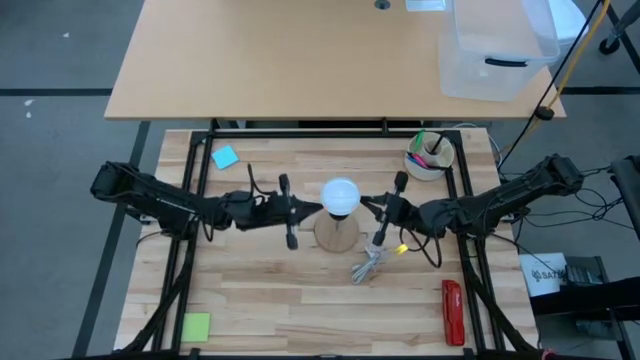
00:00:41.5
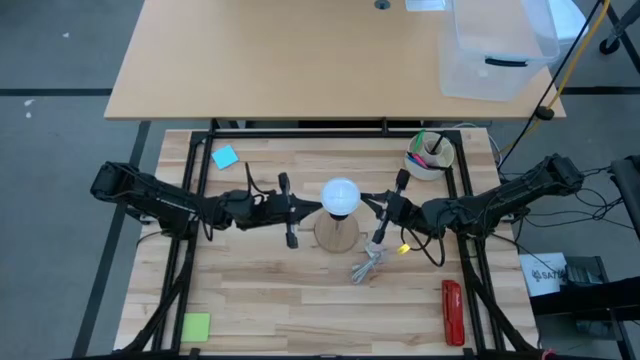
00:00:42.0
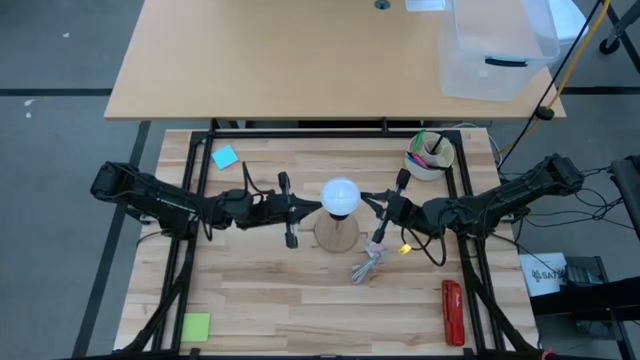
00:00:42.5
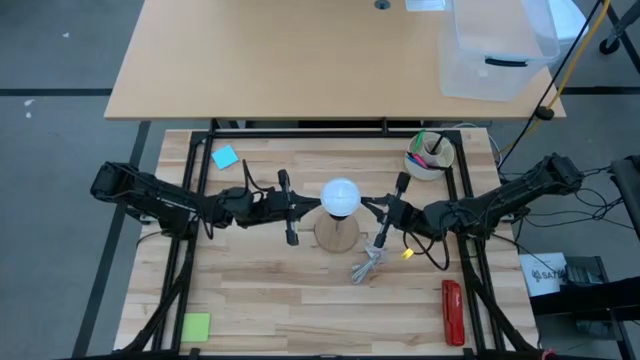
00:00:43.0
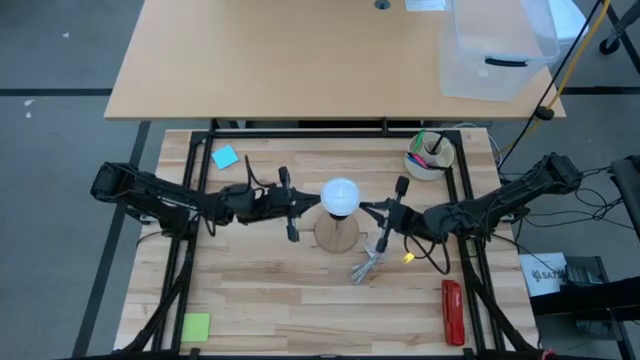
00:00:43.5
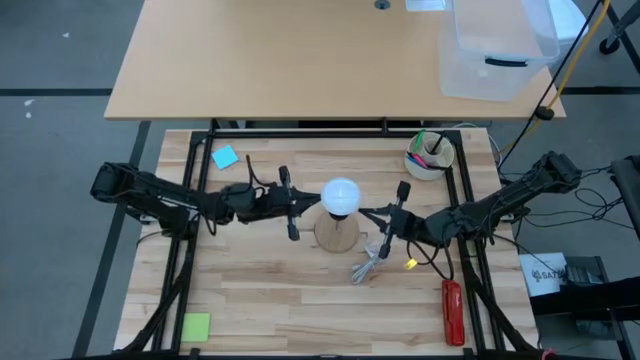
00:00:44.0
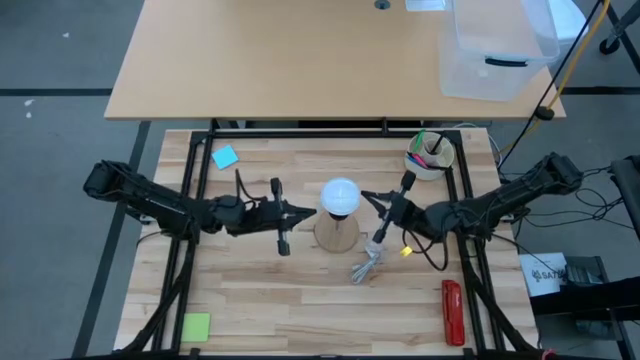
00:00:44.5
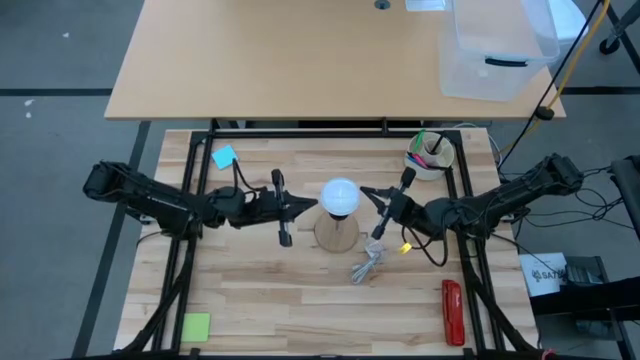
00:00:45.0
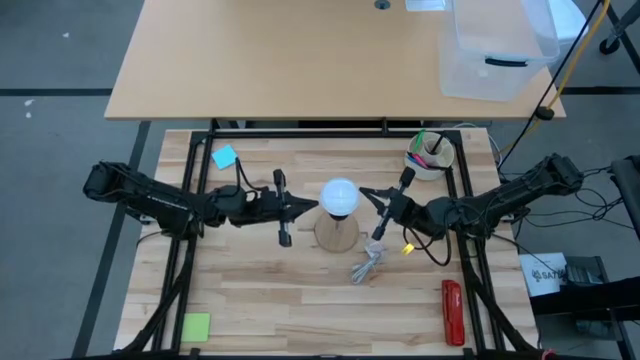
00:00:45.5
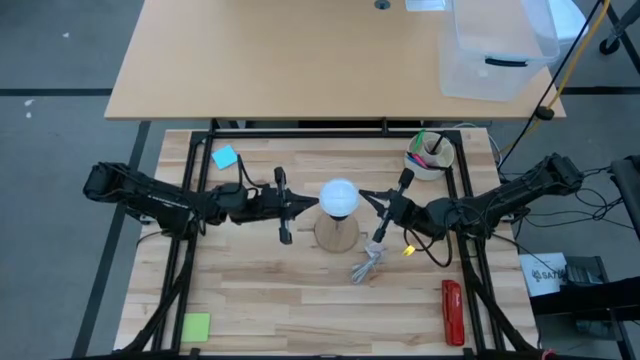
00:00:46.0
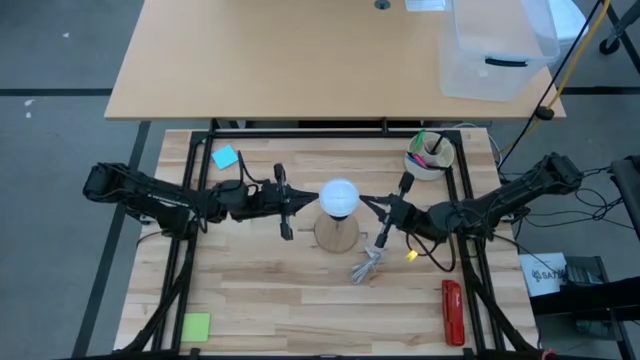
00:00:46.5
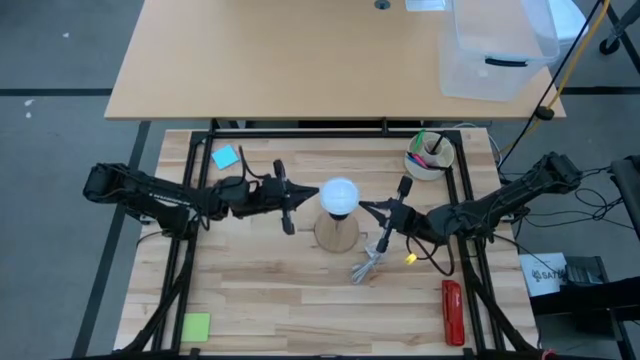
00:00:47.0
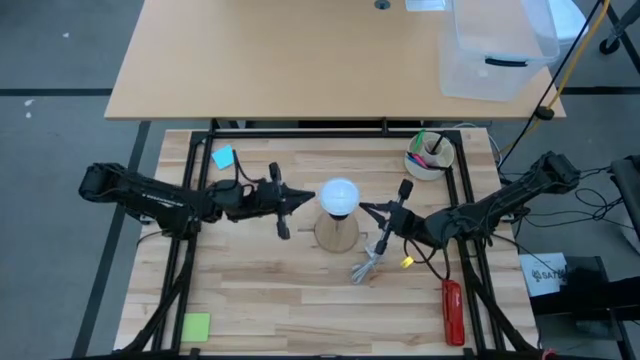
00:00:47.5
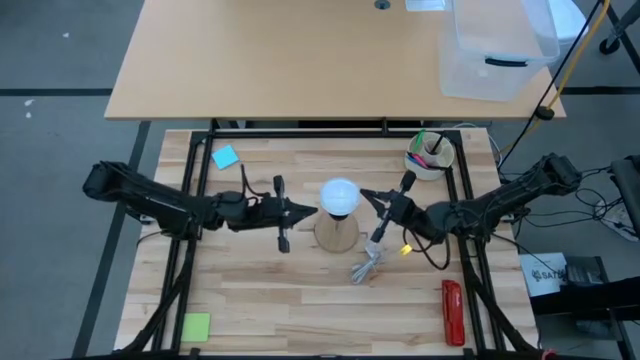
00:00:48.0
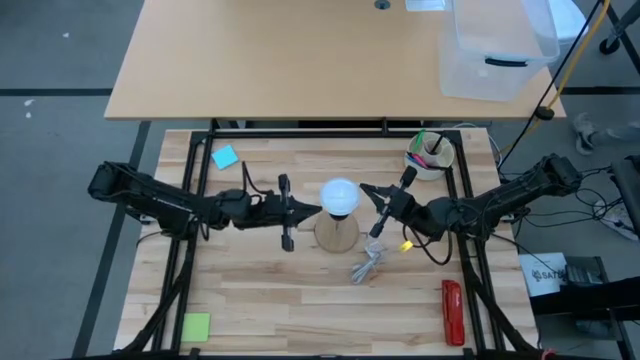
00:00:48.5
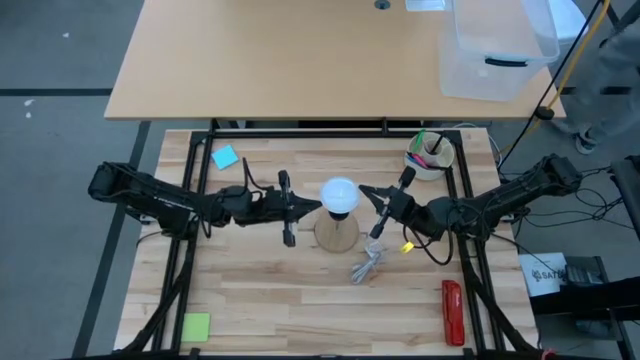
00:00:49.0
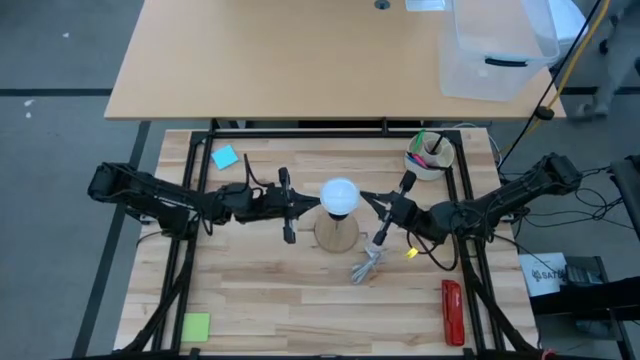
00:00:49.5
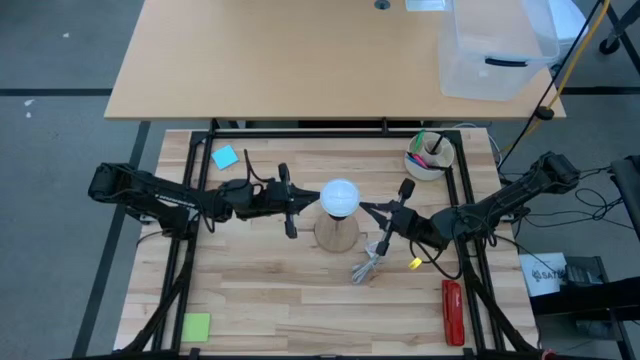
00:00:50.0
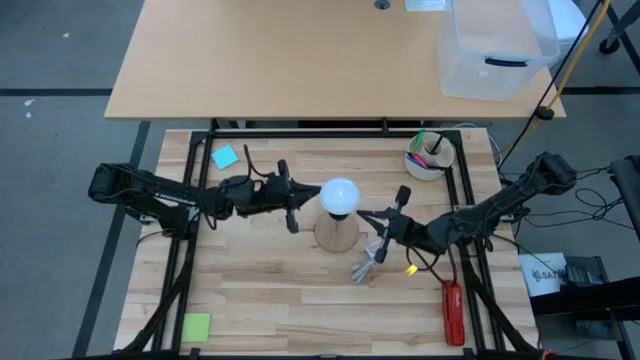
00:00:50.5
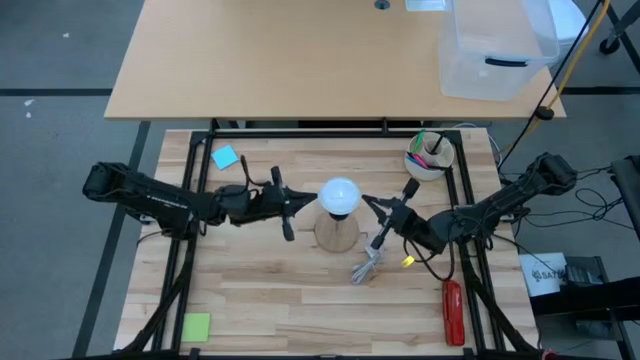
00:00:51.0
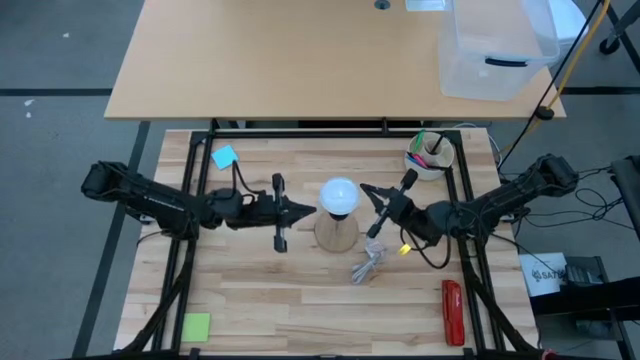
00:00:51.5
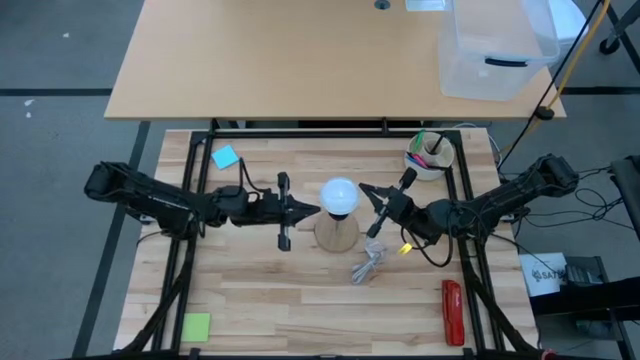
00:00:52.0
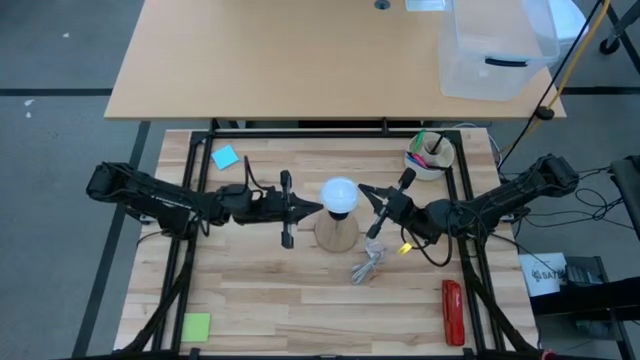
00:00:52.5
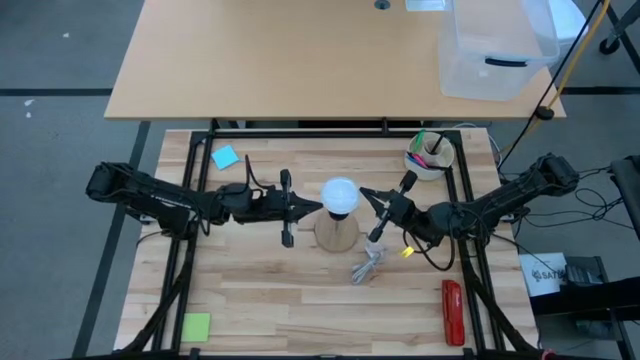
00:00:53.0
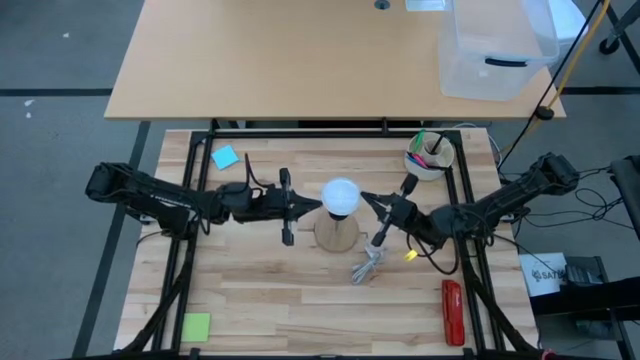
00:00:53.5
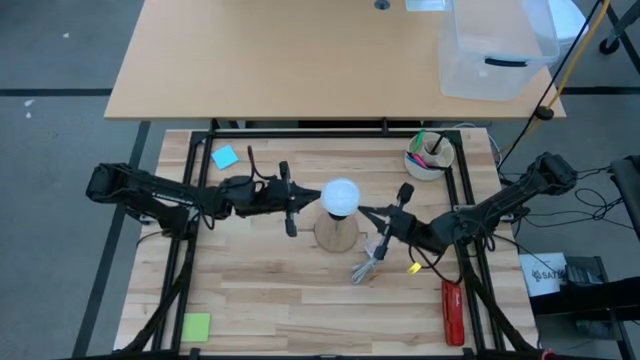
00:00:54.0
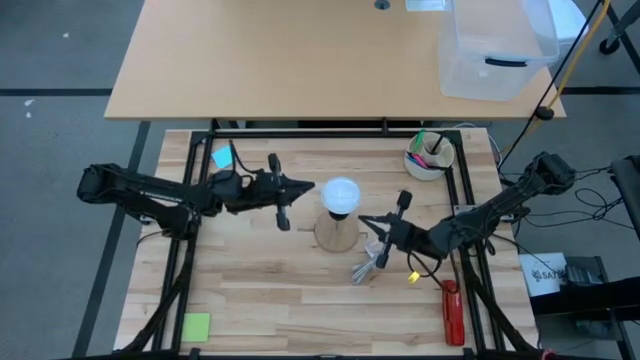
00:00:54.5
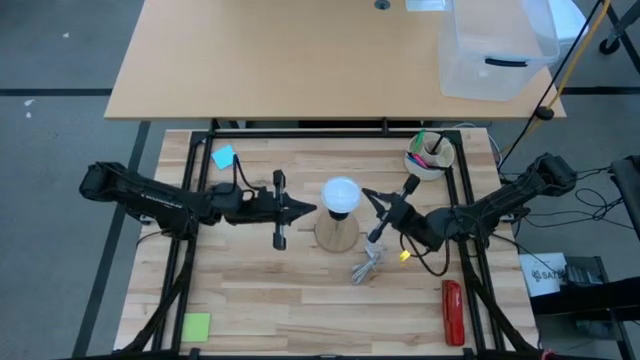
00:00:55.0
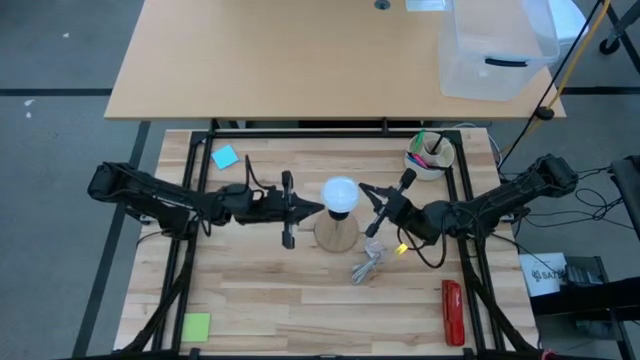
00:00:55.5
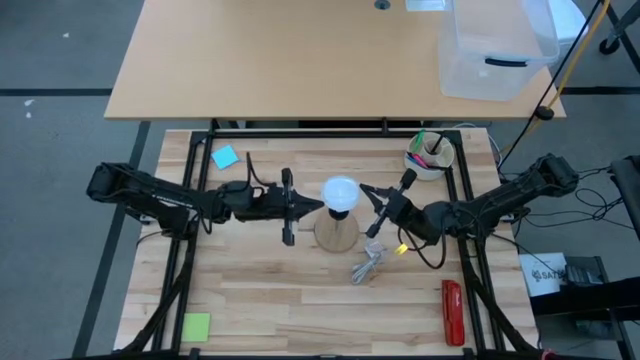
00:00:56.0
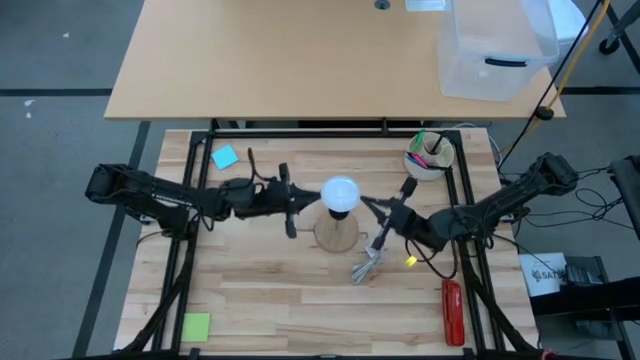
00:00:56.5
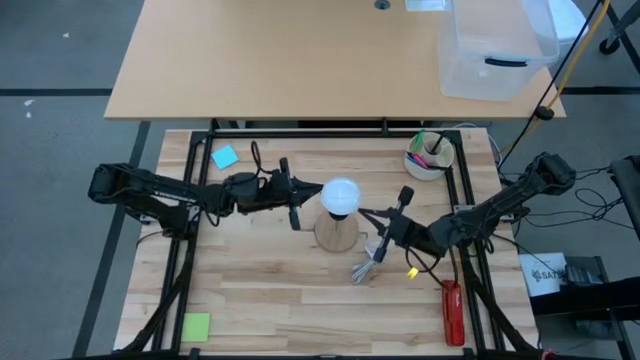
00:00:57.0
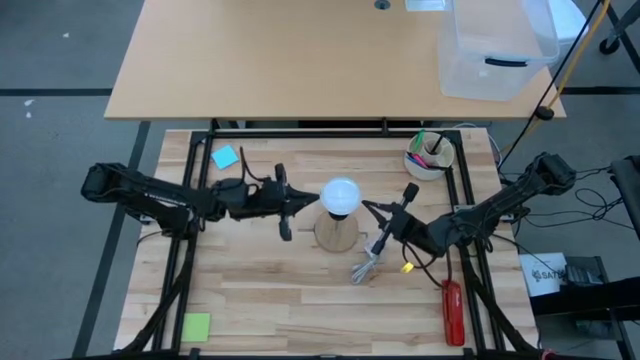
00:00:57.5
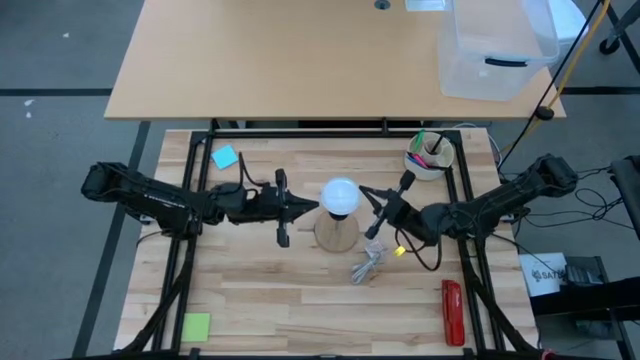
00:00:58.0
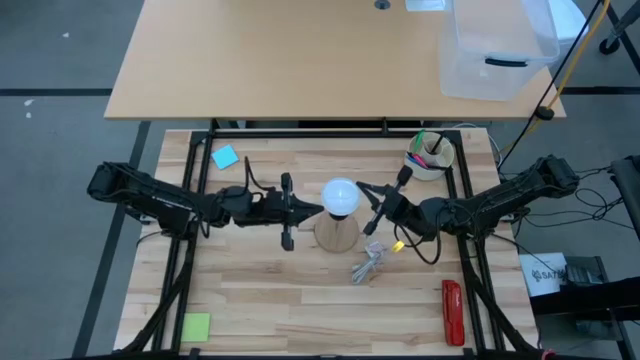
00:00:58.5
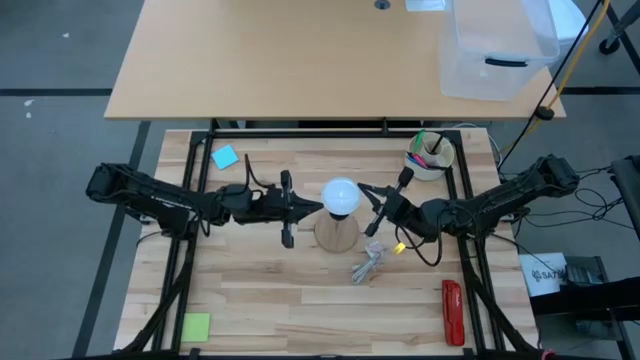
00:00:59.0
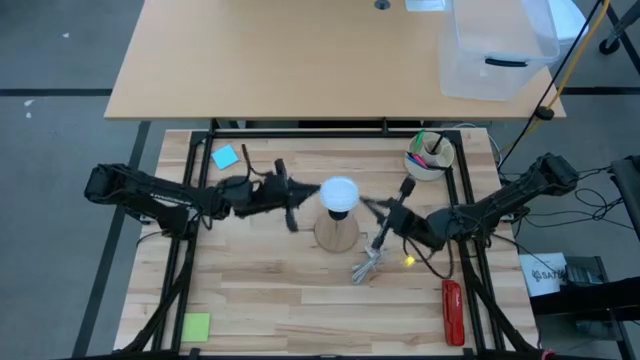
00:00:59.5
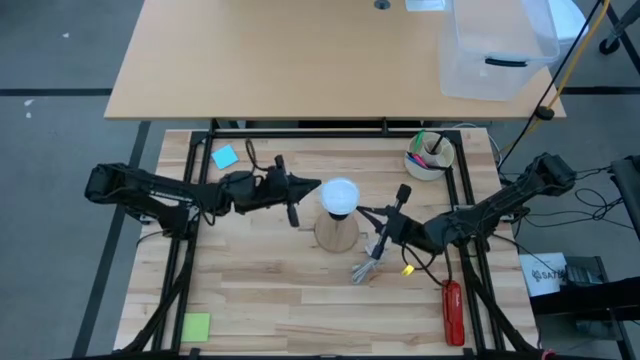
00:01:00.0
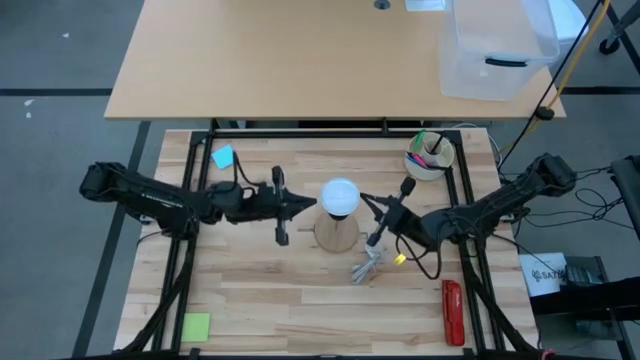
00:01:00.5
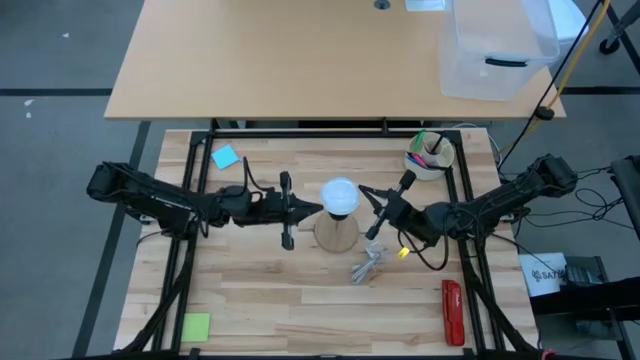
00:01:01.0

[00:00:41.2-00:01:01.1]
Task: Screw lightbulb
Insert the lightbulb into the lamp
